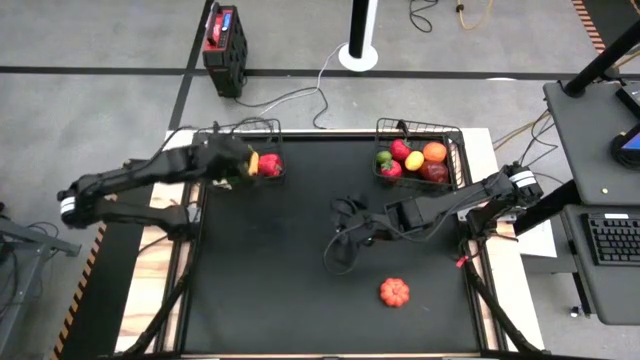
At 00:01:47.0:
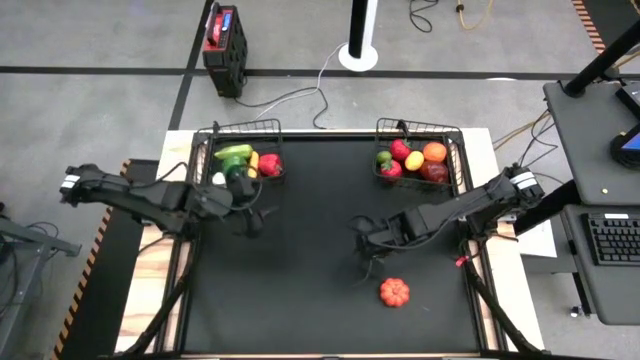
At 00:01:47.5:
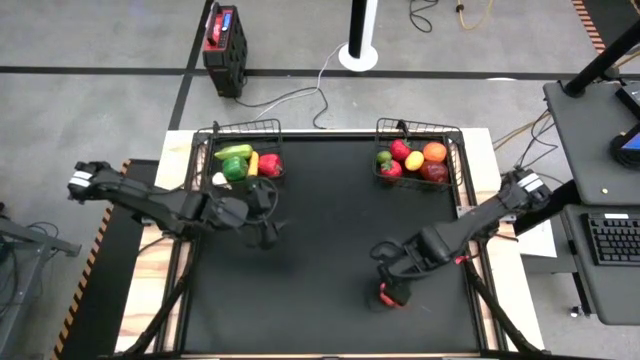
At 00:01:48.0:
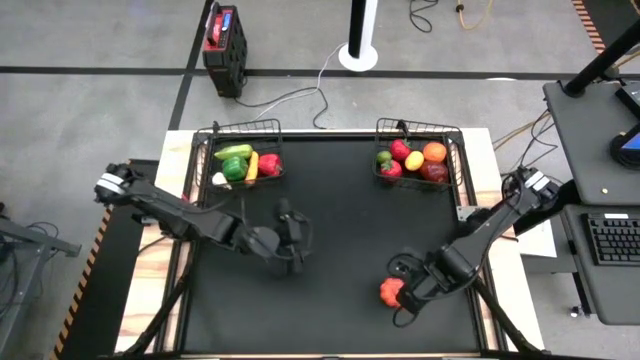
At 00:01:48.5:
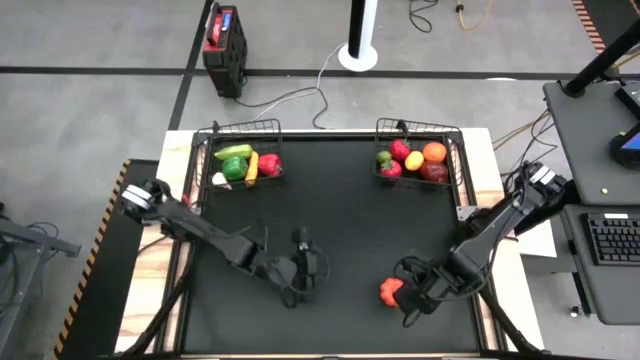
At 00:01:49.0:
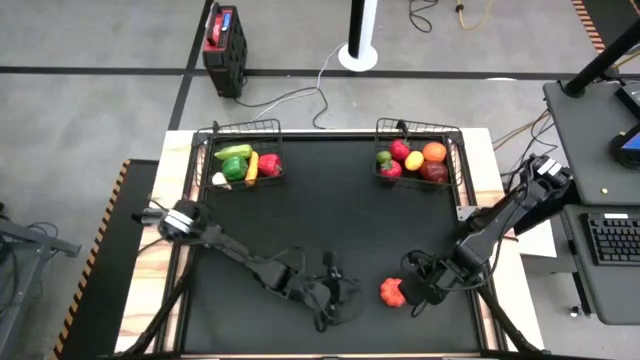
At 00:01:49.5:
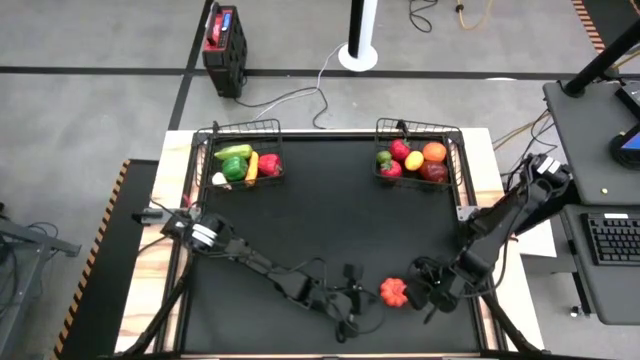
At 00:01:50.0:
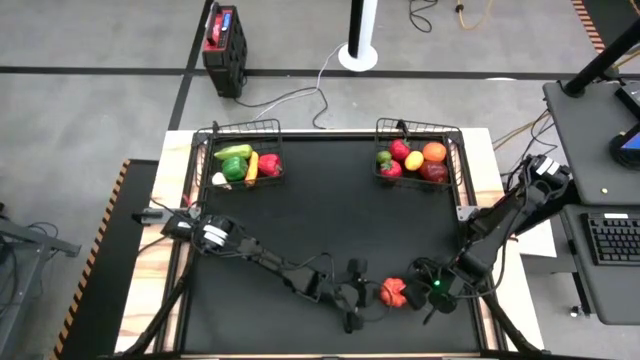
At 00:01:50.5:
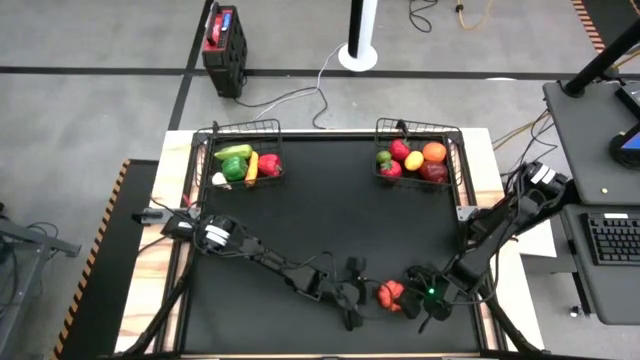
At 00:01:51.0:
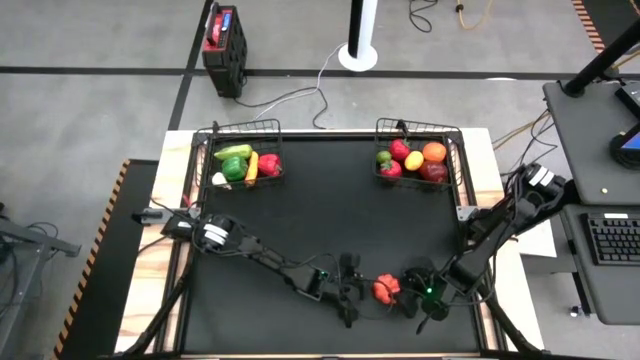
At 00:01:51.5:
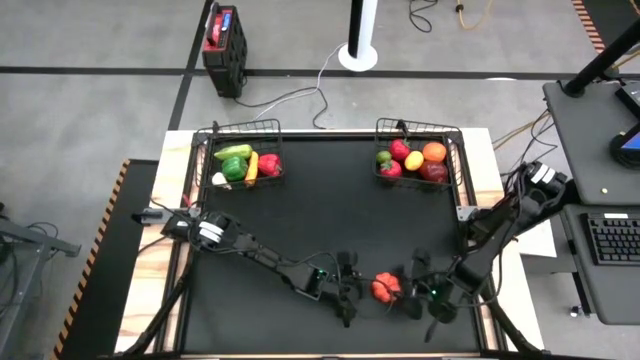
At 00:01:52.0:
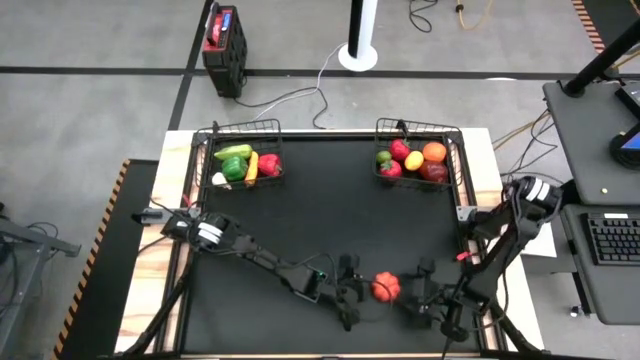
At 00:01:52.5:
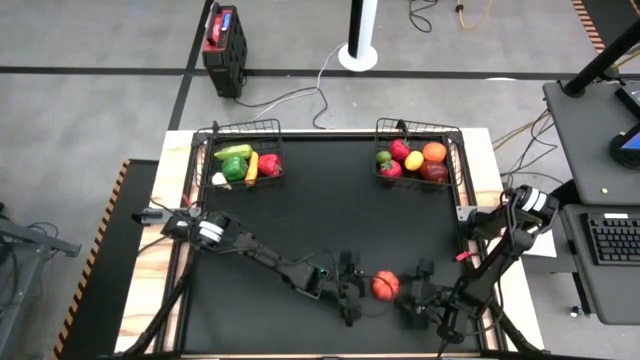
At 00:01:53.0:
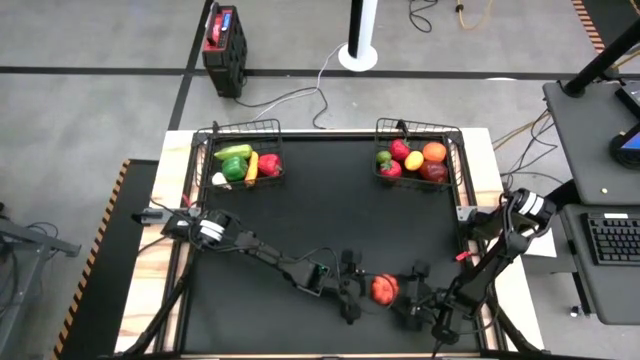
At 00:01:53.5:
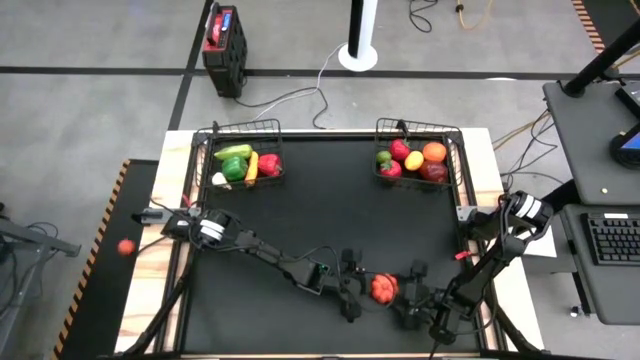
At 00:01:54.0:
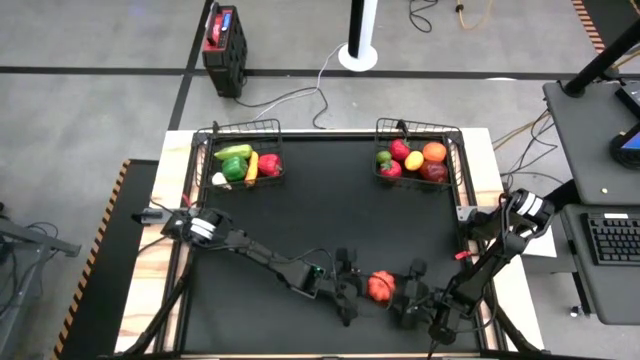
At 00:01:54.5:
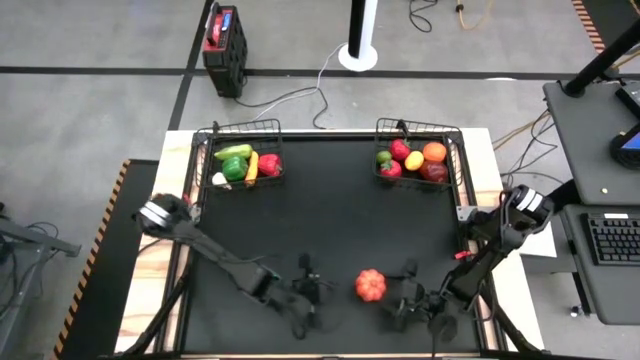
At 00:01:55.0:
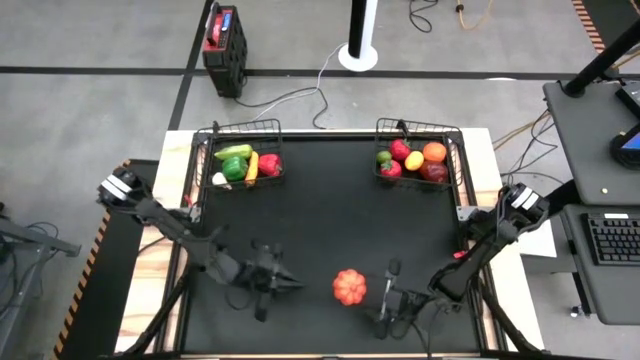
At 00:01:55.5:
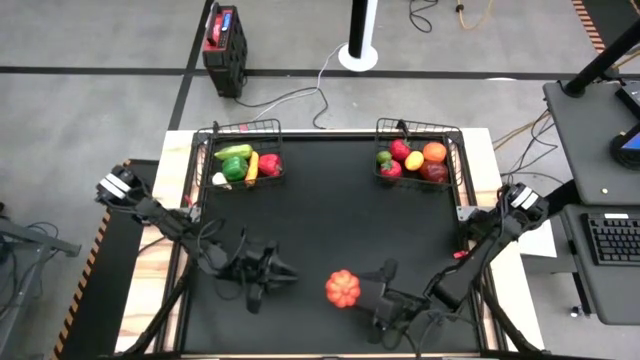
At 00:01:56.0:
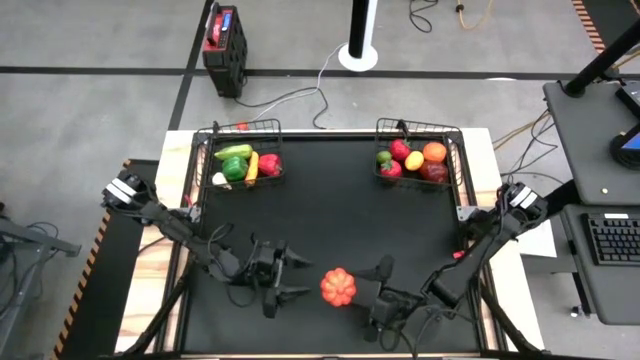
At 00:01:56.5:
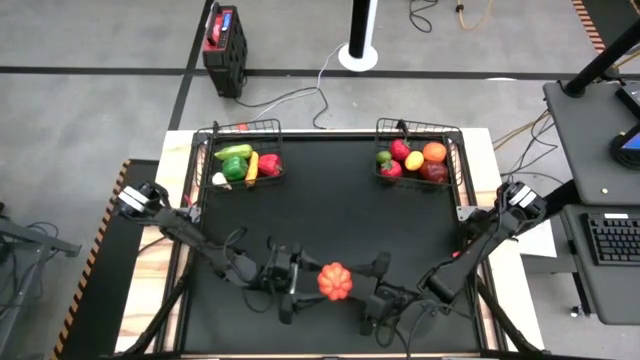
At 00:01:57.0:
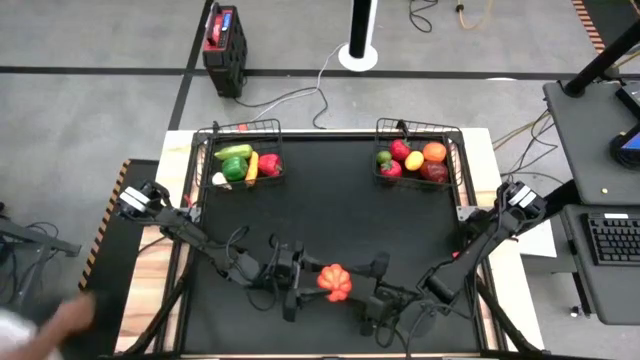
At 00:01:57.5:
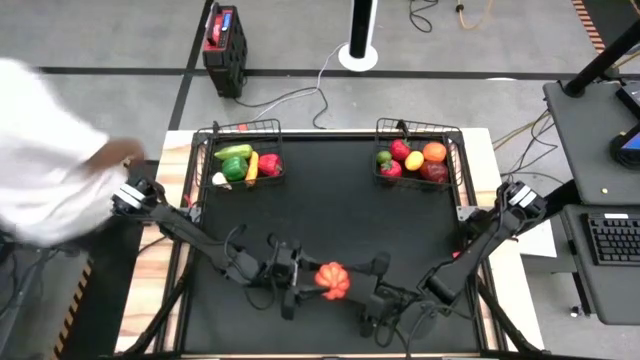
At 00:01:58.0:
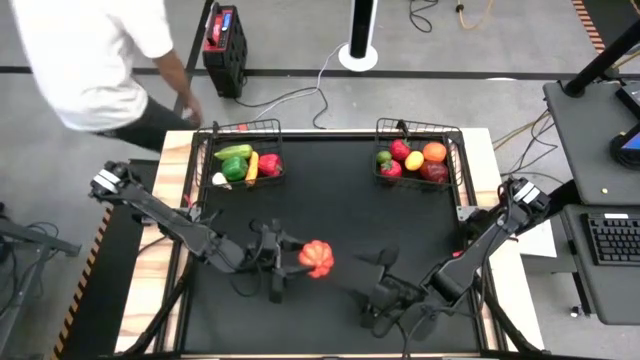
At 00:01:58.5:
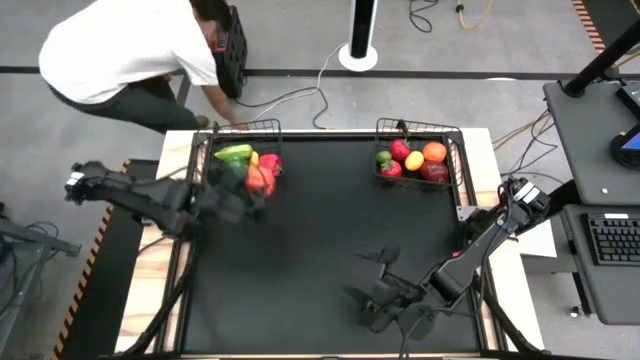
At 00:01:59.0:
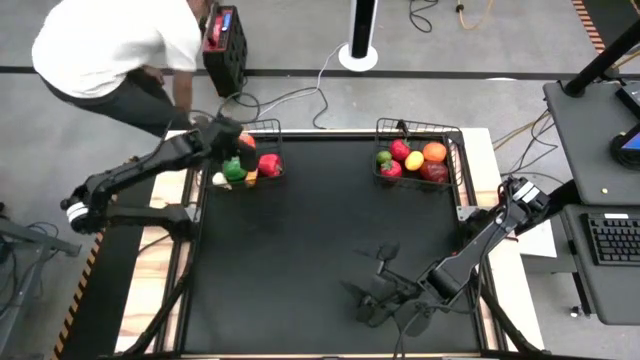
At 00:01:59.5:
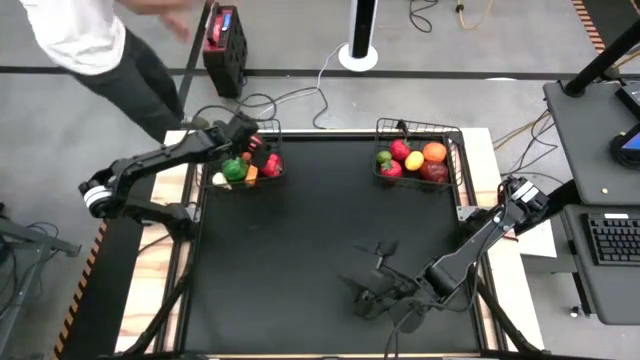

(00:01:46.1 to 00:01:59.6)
Task: Sort produce into baskets
Put the pumpkin into the left wire basket

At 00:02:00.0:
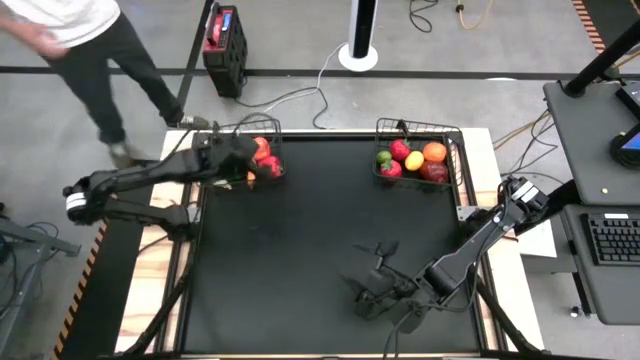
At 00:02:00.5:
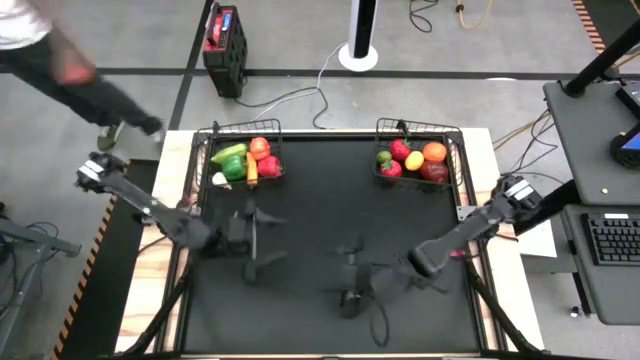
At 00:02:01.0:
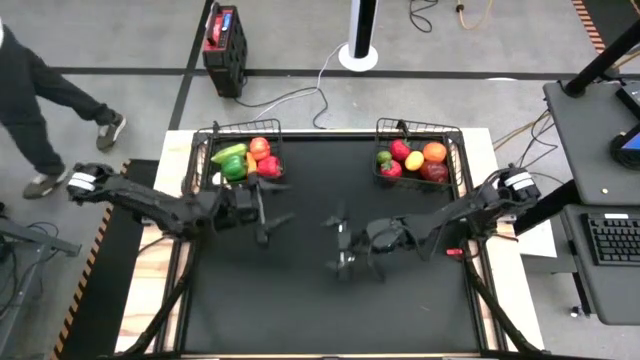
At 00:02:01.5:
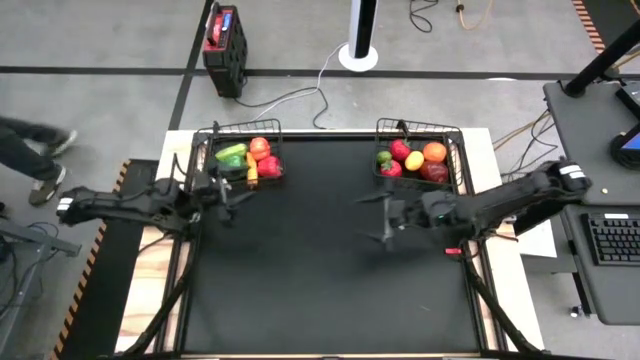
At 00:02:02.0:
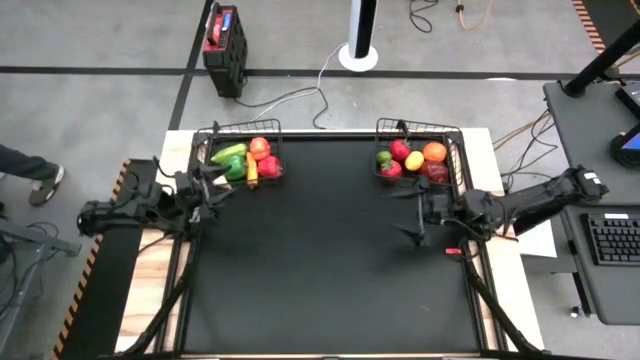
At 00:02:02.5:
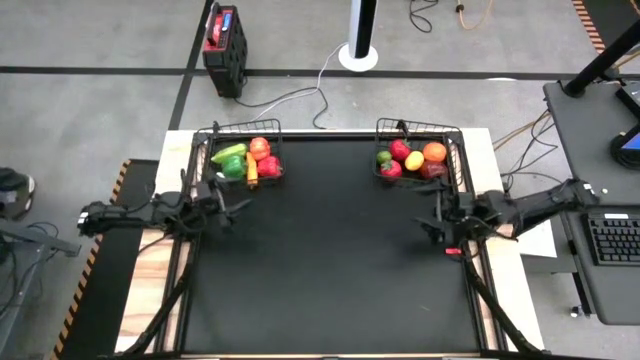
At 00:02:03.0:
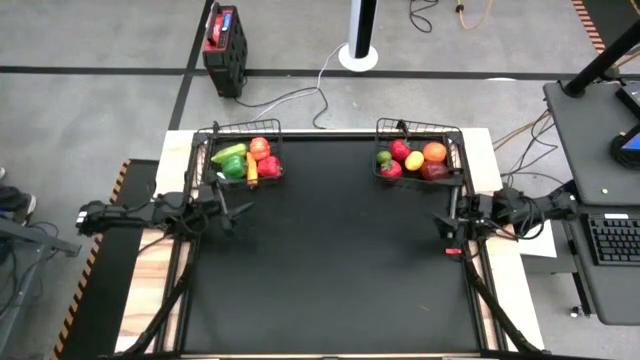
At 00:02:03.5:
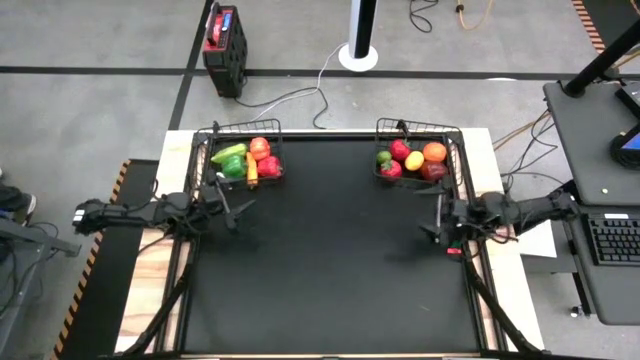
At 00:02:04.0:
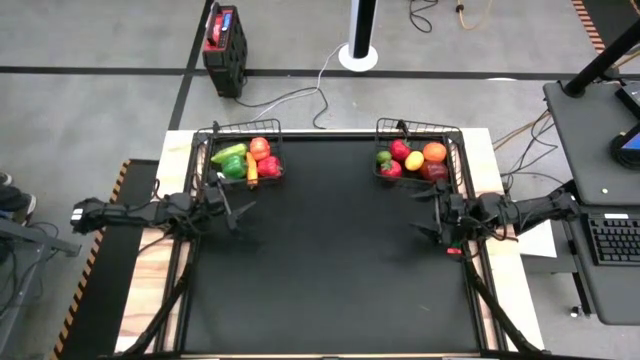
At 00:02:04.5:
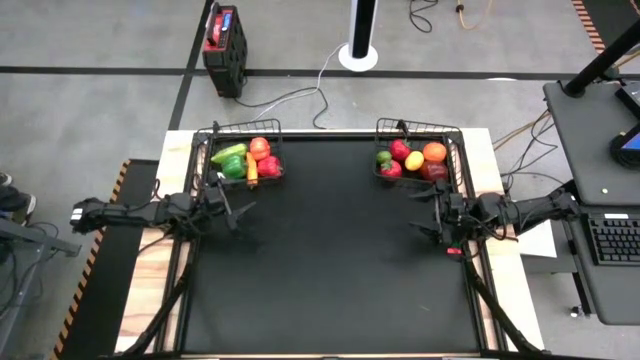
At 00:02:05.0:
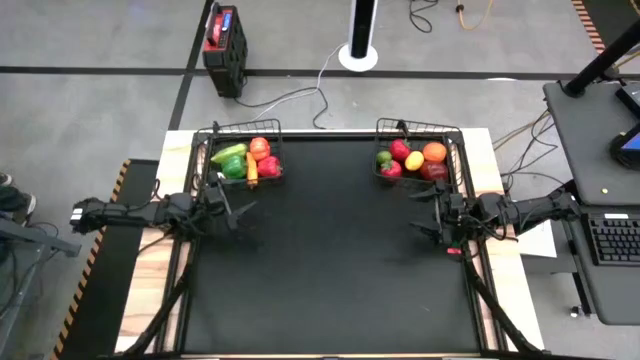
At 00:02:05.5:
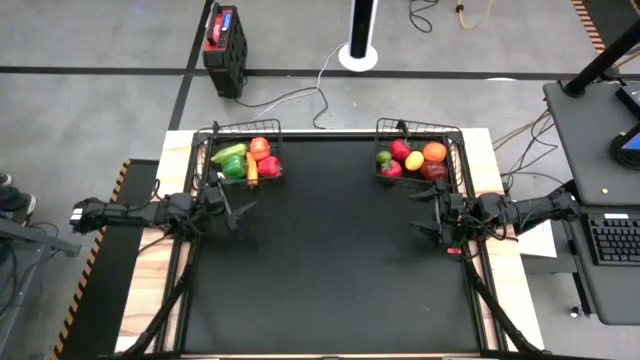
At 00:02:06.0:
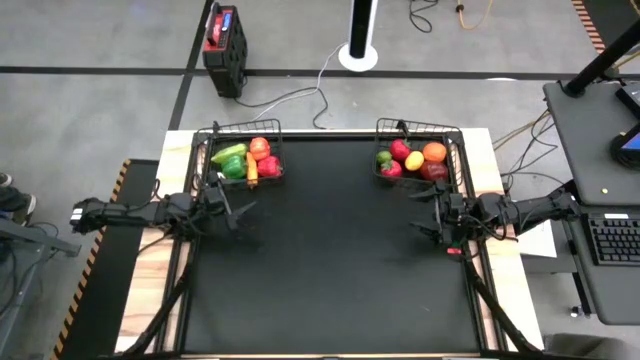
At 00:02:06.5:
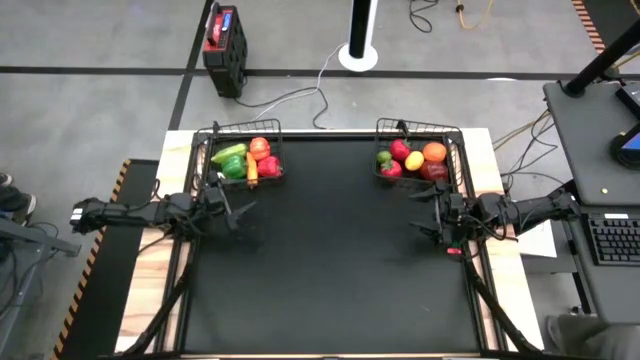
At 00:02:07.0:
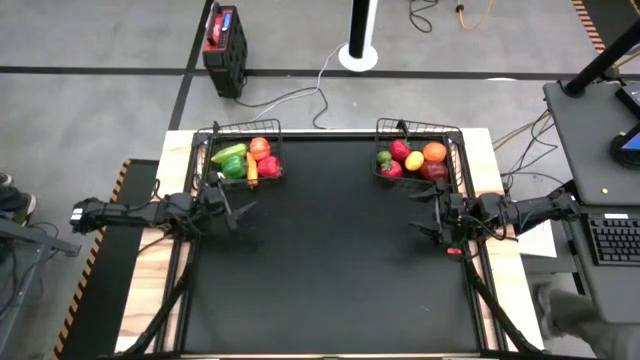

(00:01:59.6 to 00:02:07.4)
Return to Home Position
